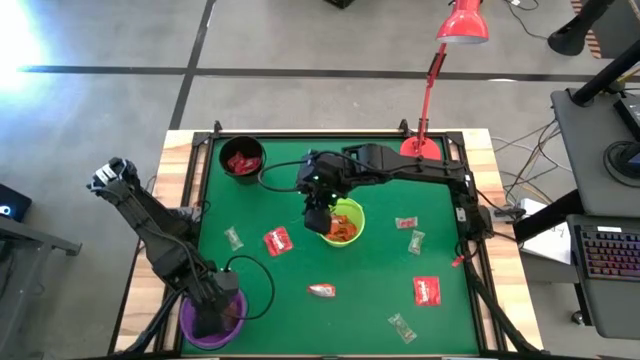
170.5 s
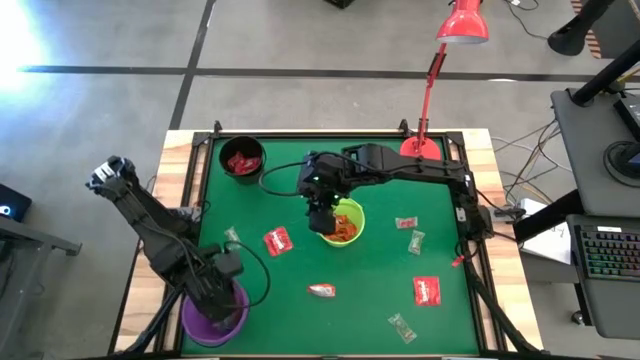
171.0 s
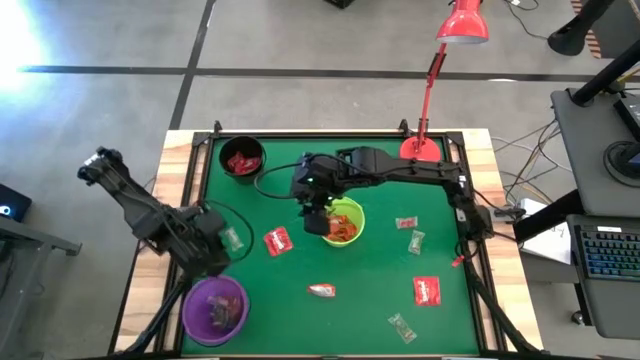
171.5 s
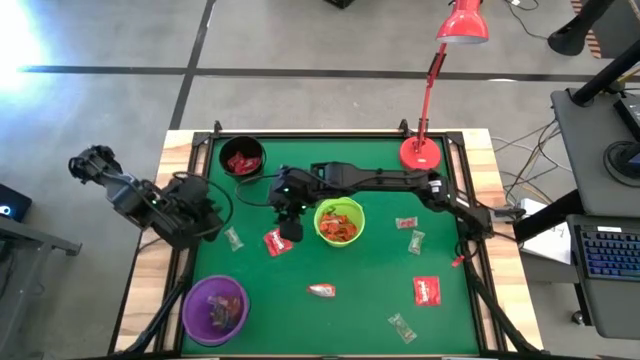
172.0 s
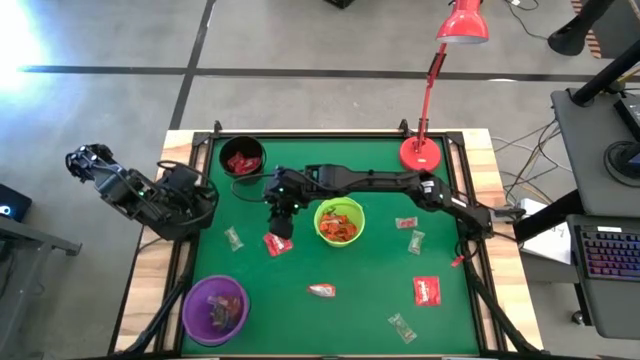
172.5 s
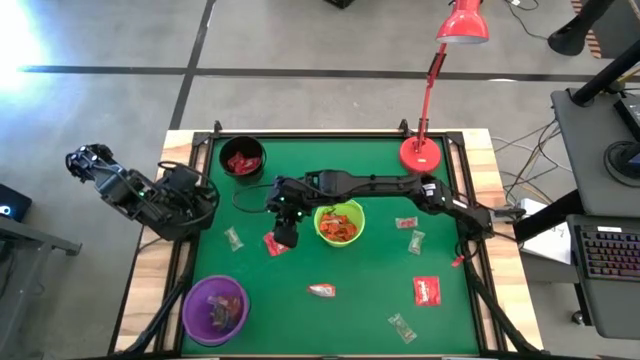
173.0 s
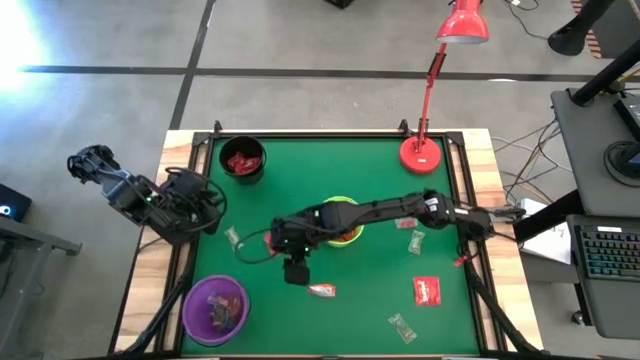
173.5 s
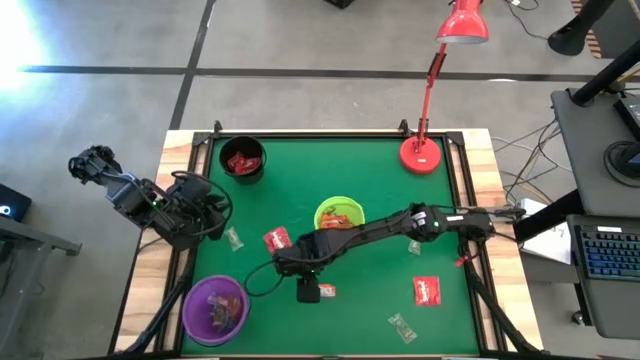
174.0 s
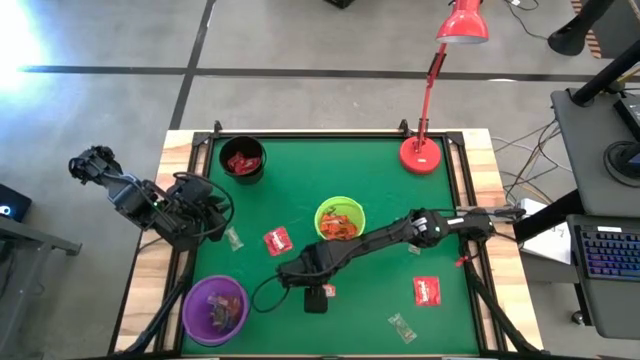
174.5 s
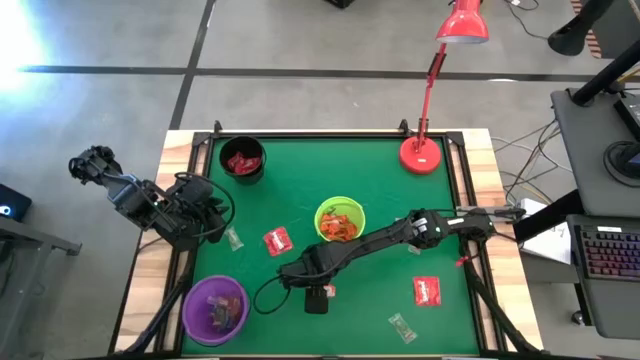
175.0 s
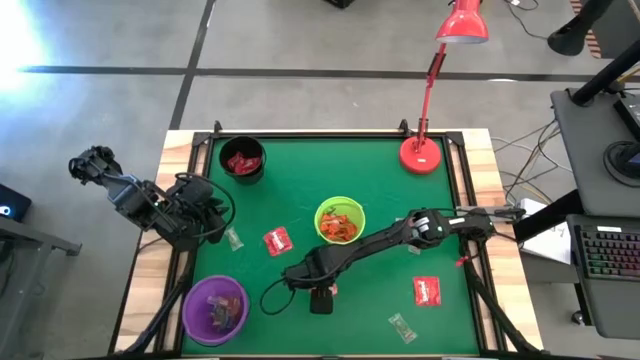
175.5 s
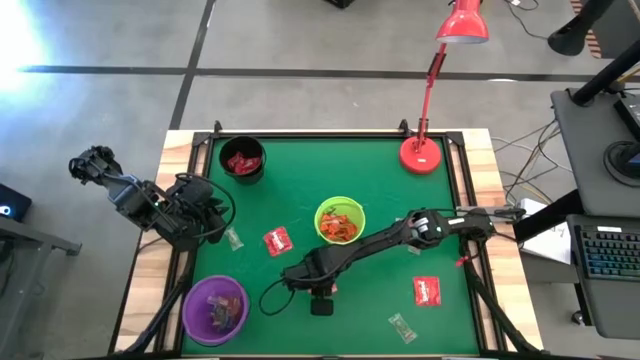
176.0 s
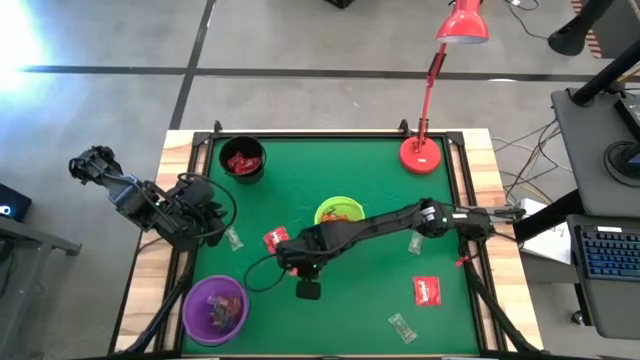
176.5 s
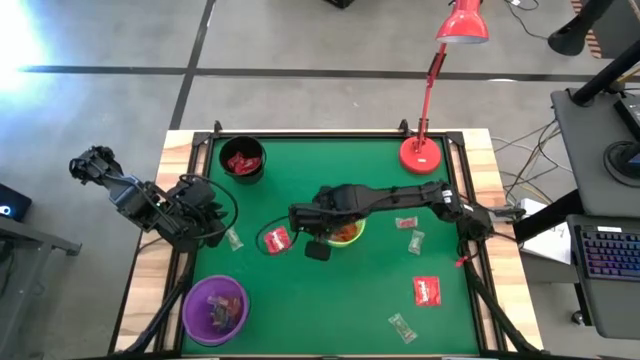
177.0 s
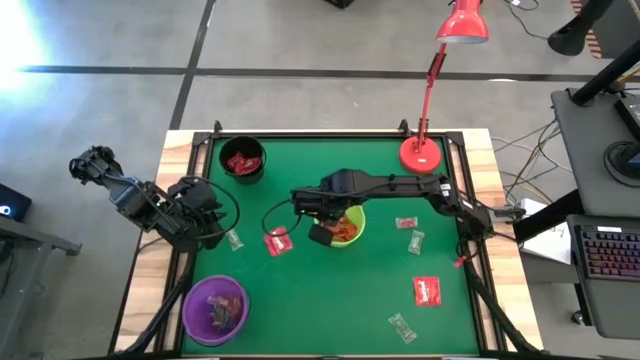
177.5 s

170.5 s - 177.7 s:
Task: Sort candy
Put the orange chocolate into the green bucket

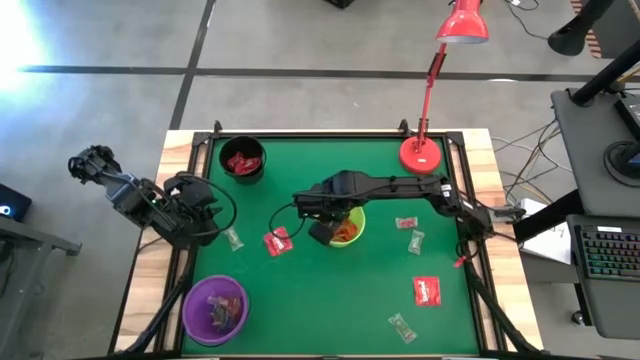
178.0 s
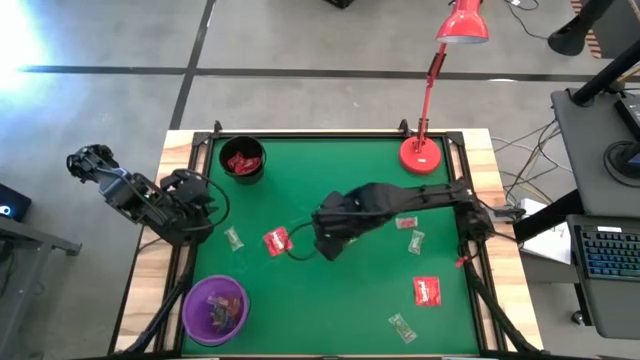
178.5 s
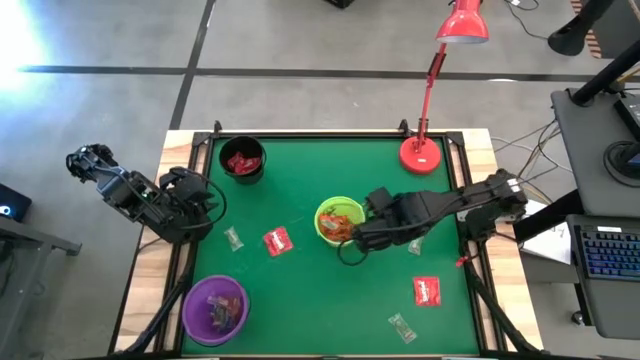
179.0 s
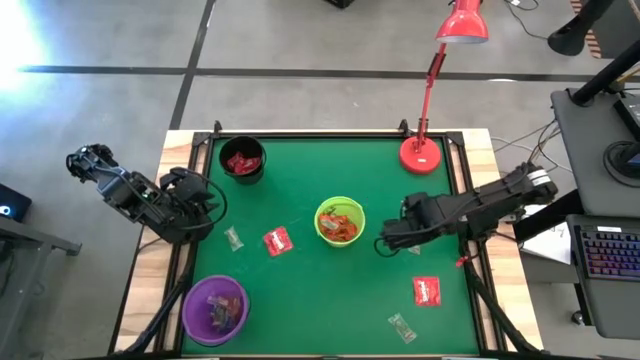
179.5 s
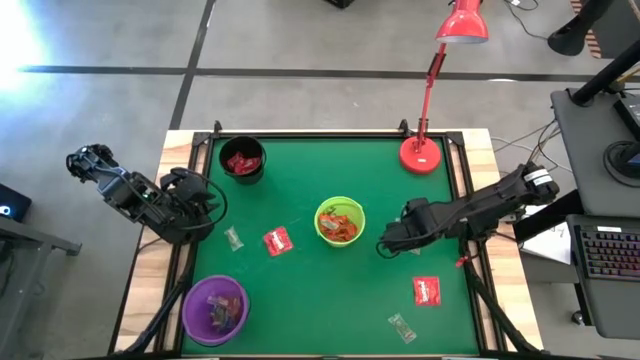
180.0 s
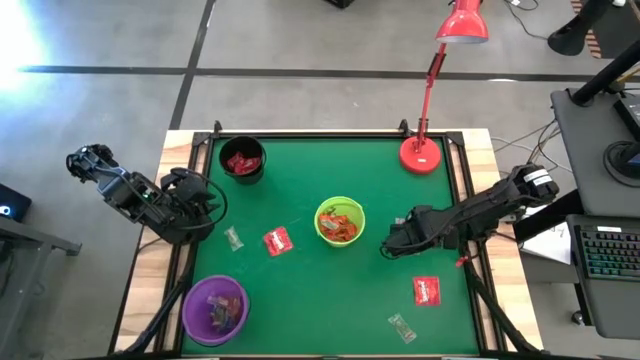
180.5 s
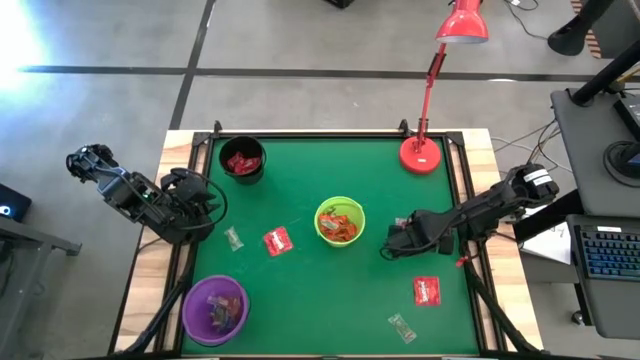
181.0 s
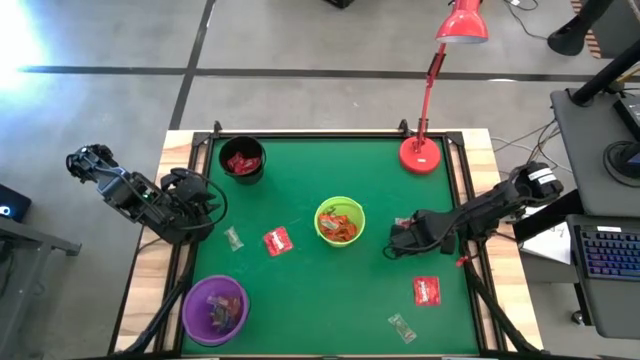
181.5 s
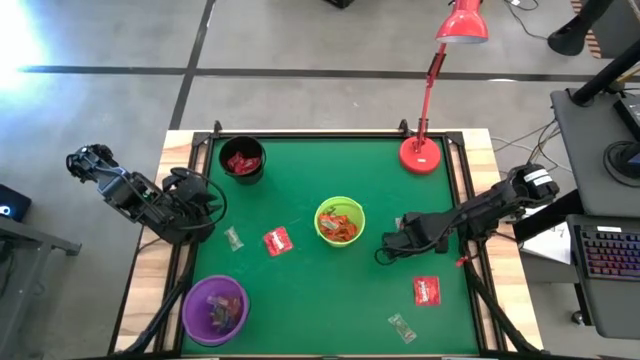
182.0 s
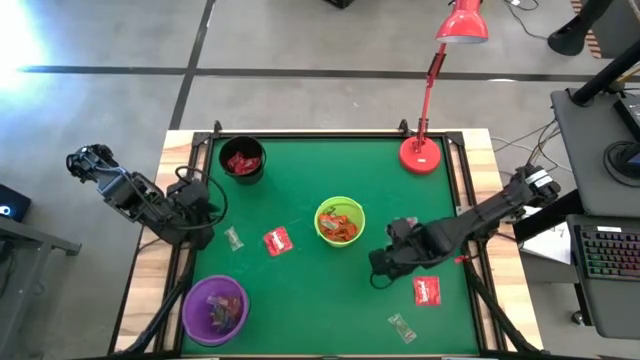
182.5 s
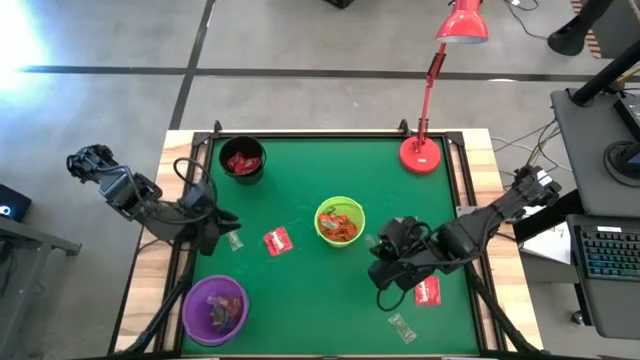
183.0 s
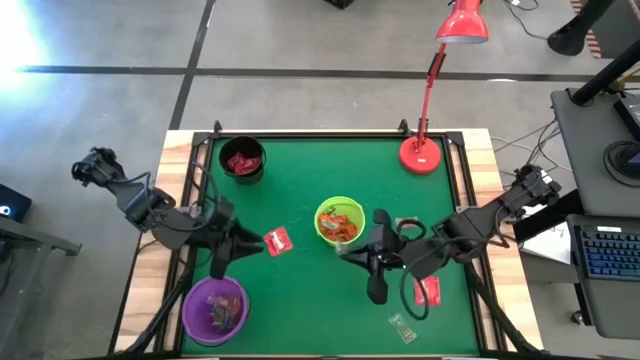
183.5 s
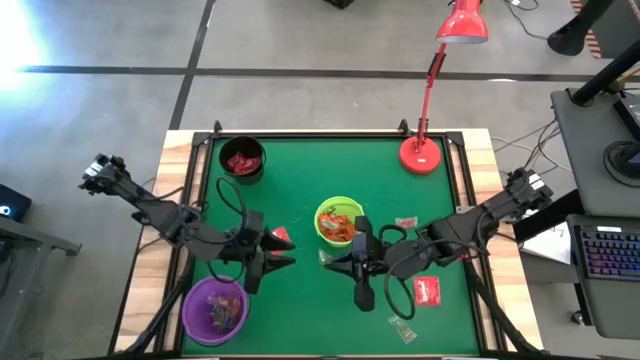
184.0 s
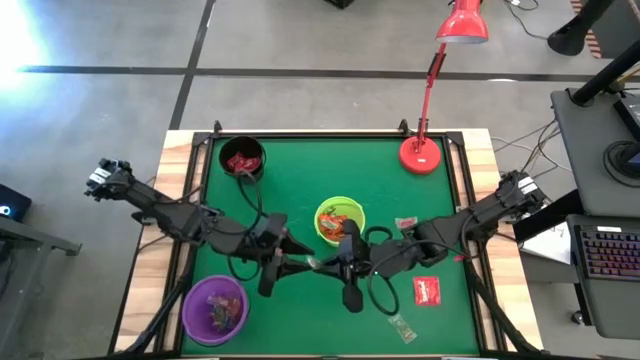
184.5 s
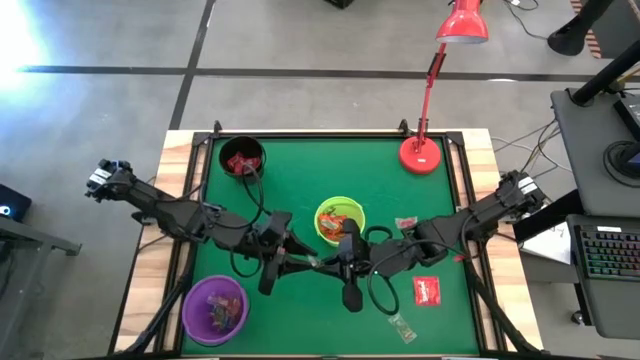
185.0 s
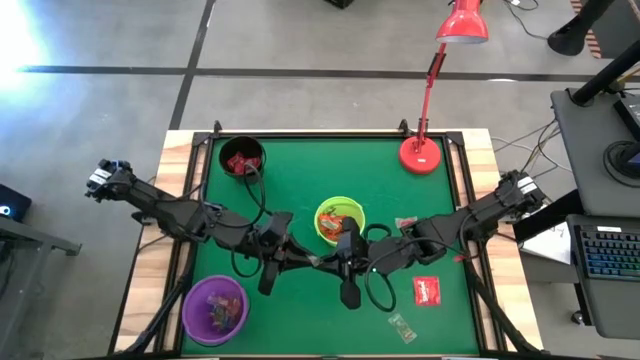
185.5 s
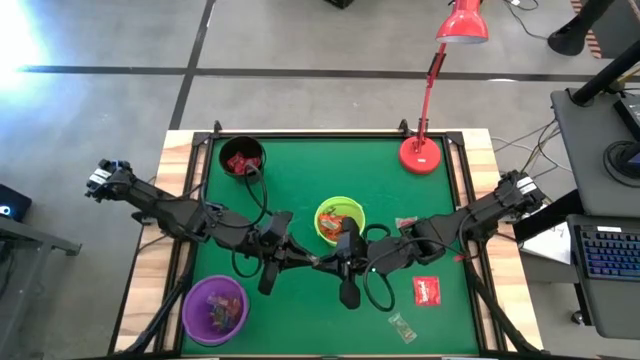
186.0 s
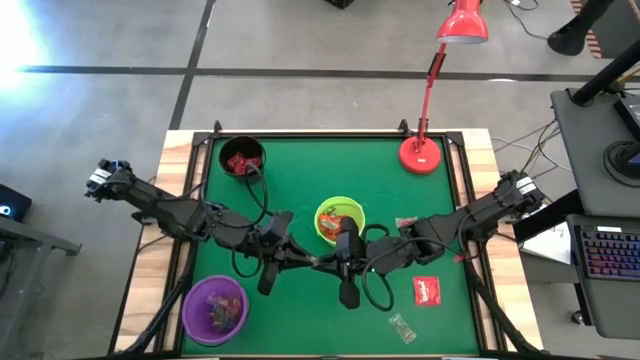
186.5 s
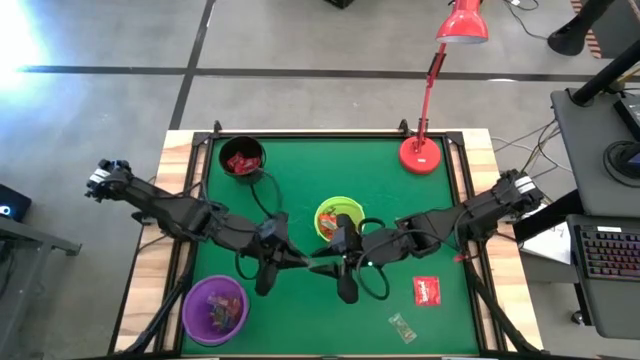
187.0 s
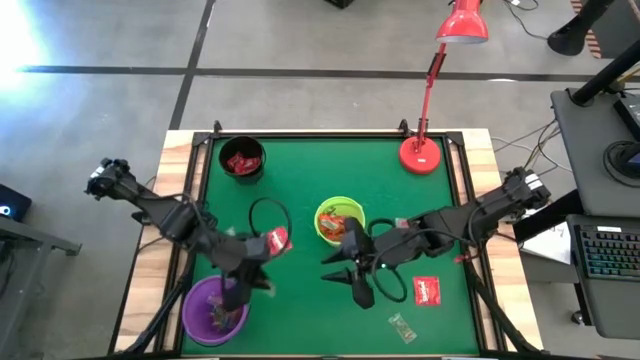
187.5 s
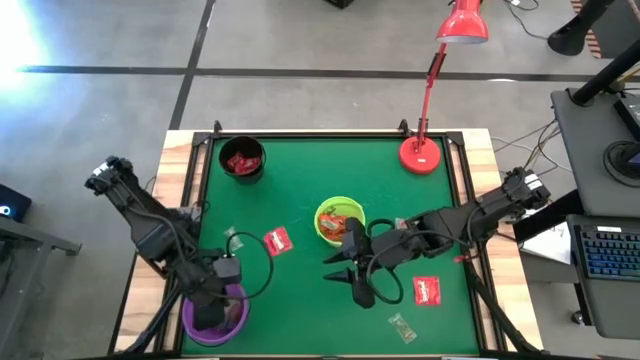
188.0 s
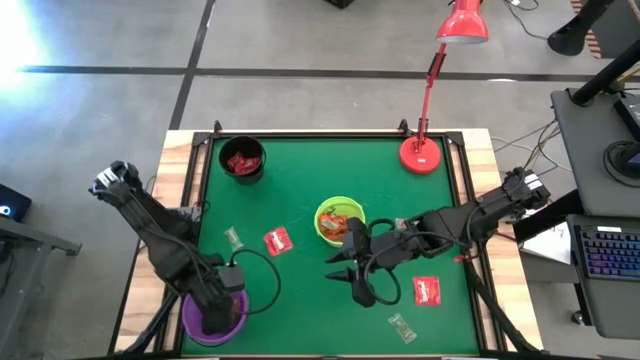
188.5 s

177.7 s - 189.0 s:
Put the green gummy into the purple bucket

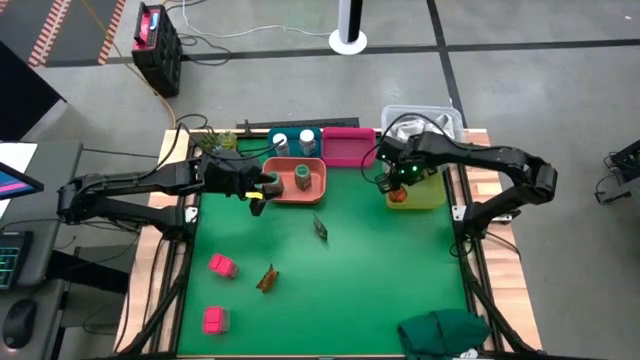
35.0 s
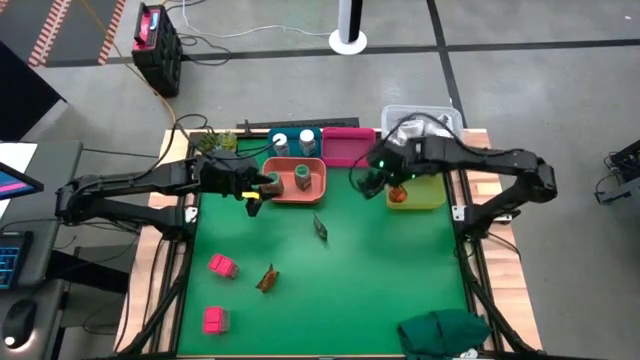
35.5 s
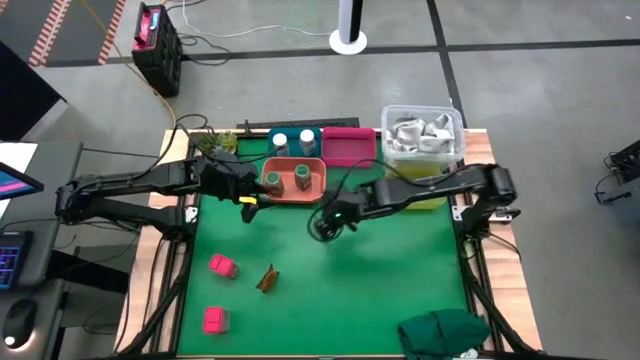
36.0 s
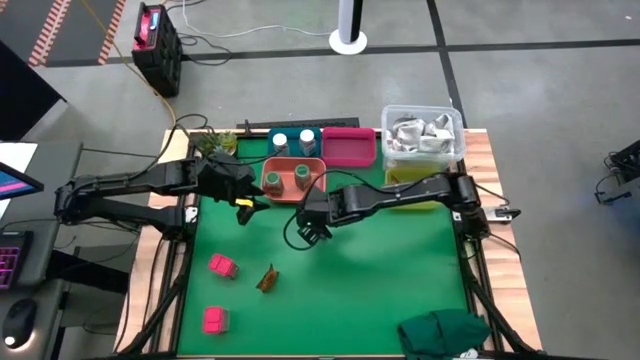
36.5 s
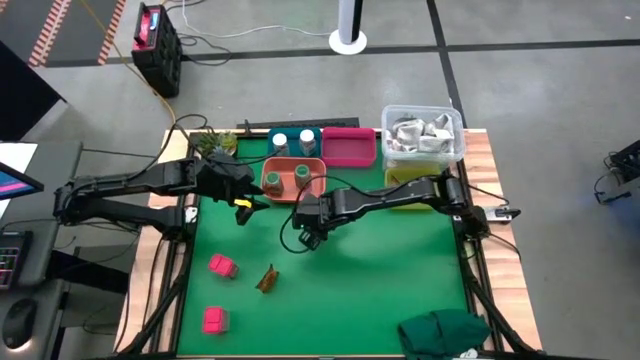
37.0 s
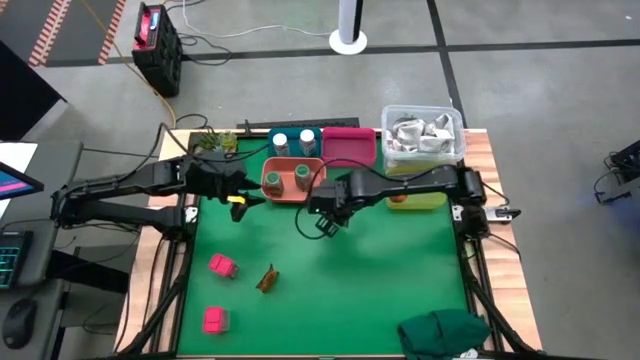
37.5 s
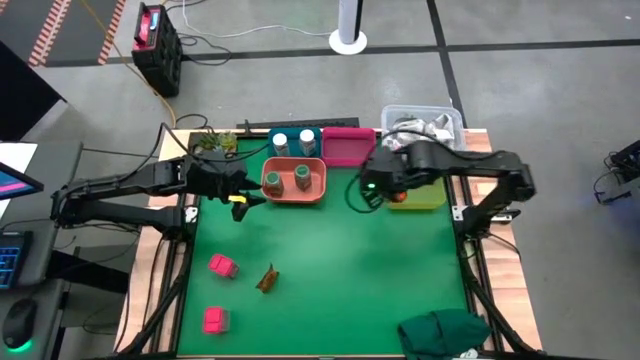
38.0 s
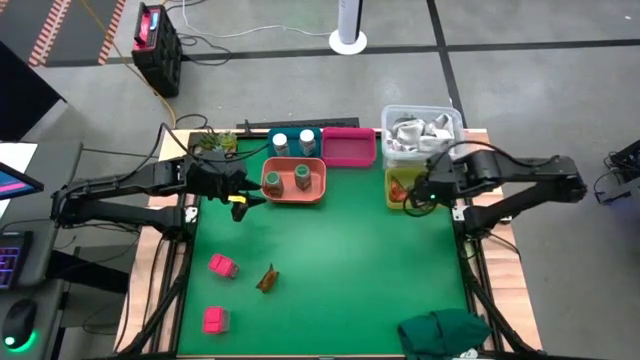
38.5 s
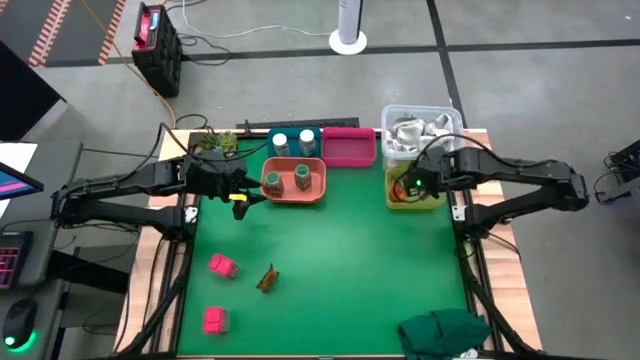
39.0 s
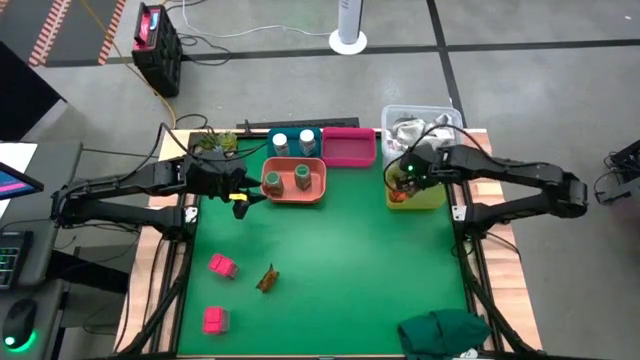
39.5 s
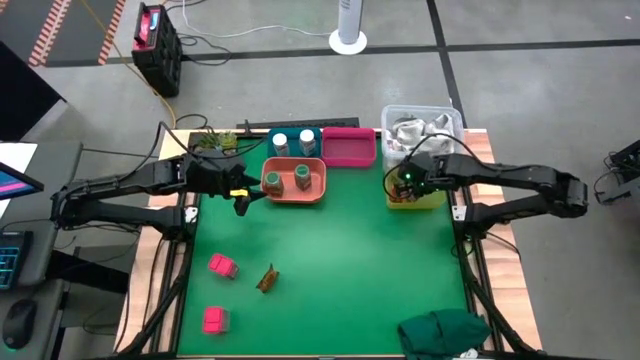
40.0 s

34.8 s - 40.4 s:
Task: Sort spices by type
Put the top orange seasoning pack into the yellow bin
